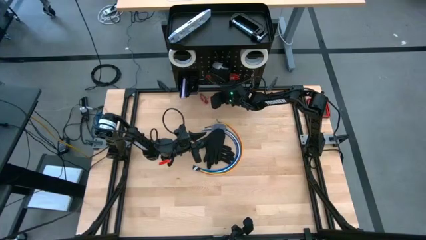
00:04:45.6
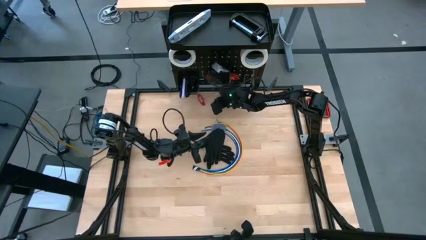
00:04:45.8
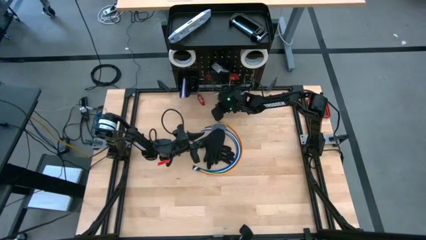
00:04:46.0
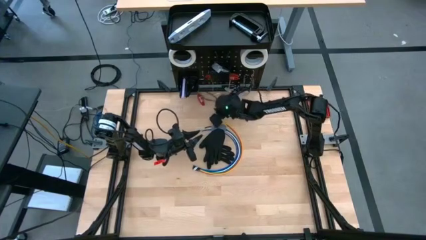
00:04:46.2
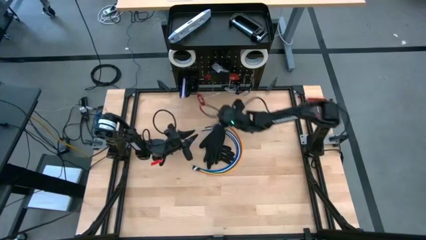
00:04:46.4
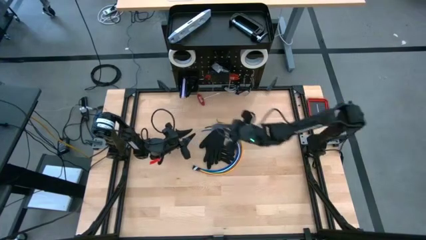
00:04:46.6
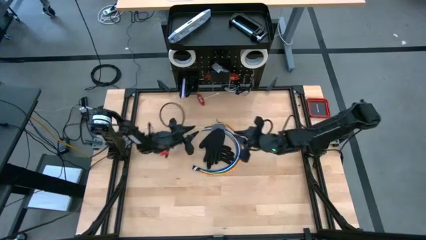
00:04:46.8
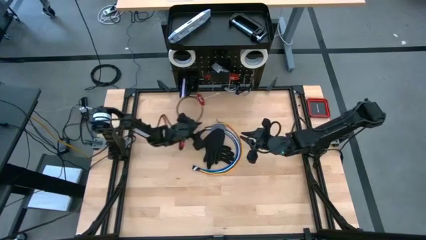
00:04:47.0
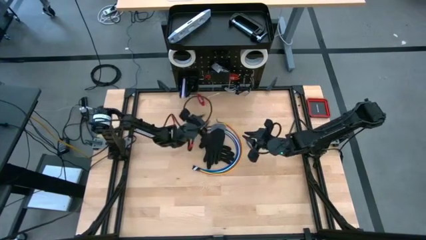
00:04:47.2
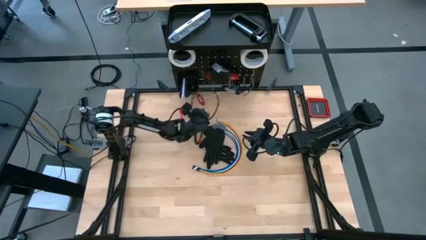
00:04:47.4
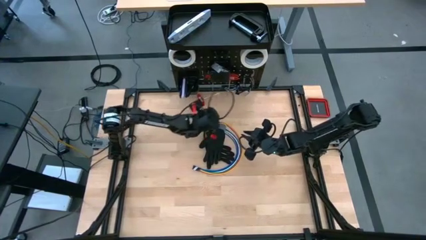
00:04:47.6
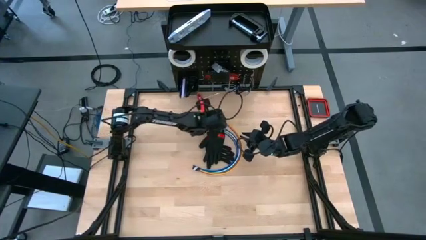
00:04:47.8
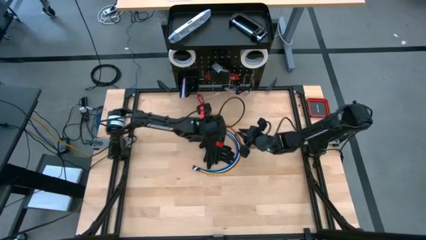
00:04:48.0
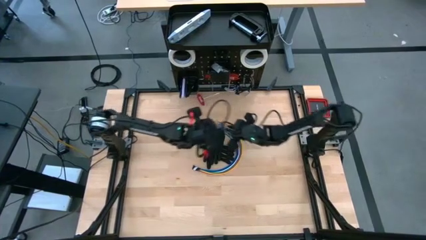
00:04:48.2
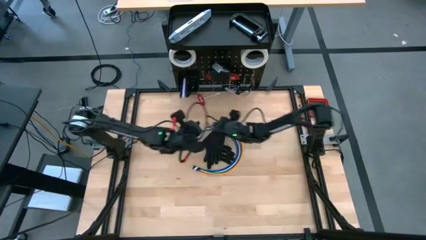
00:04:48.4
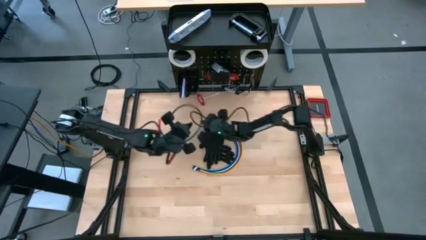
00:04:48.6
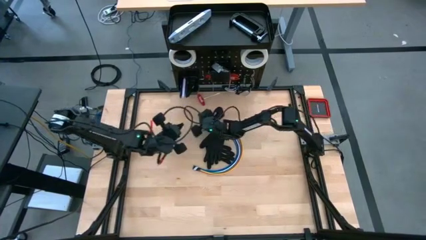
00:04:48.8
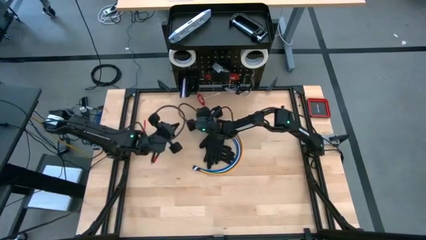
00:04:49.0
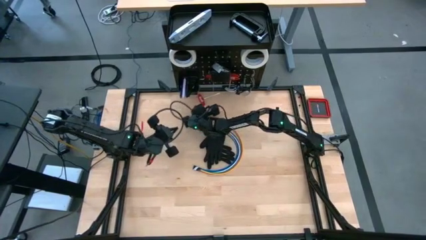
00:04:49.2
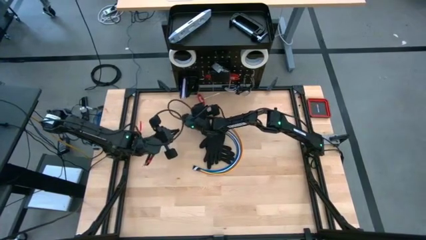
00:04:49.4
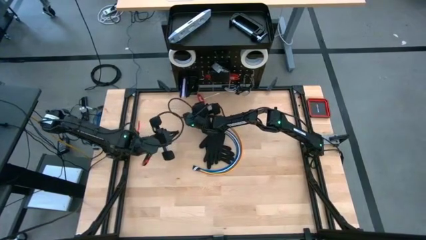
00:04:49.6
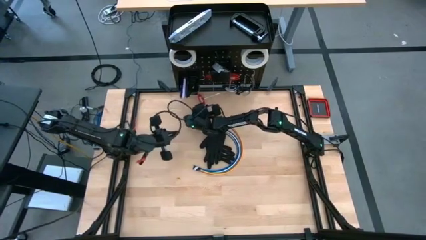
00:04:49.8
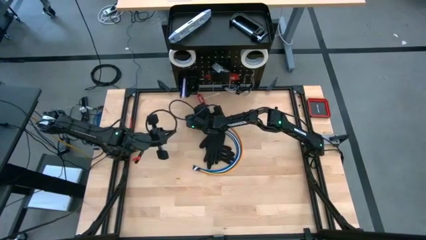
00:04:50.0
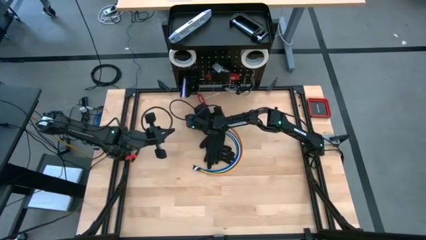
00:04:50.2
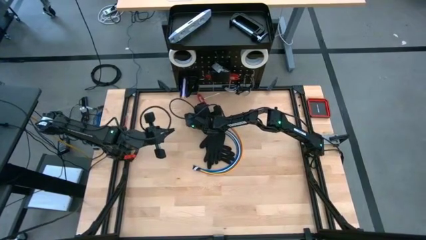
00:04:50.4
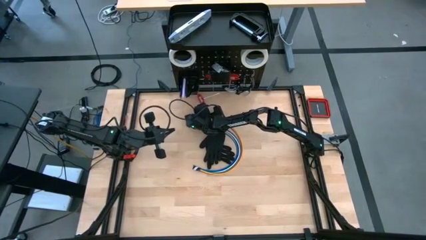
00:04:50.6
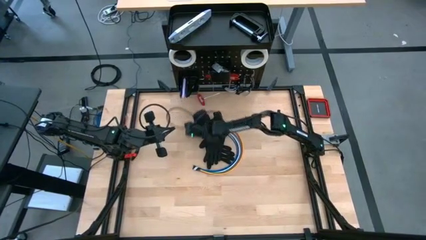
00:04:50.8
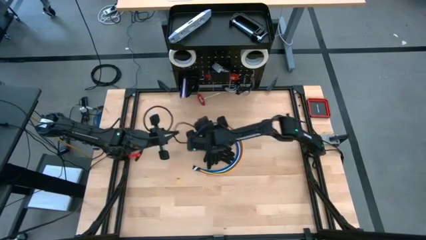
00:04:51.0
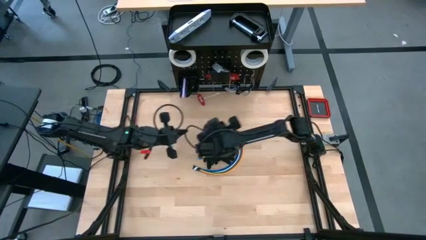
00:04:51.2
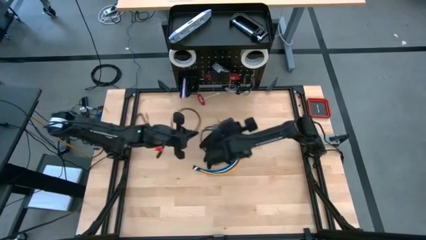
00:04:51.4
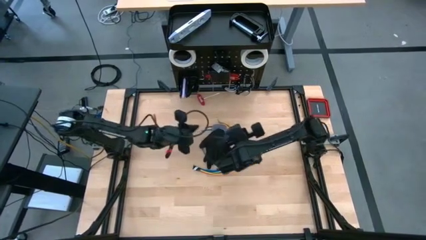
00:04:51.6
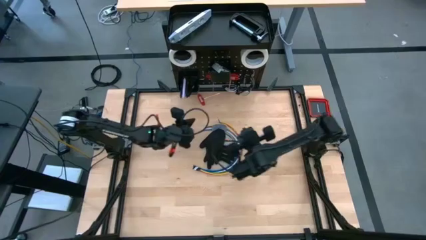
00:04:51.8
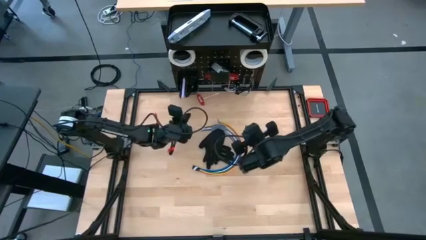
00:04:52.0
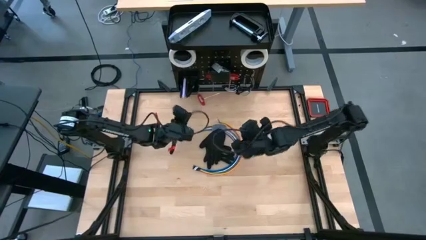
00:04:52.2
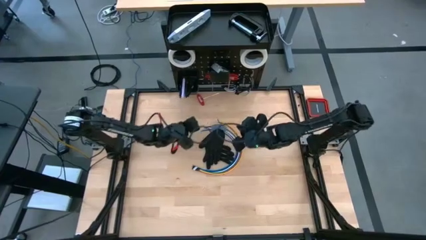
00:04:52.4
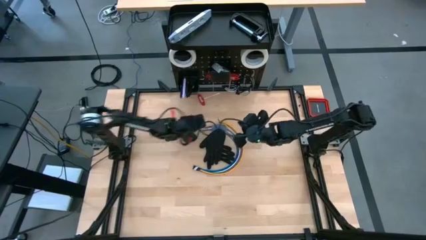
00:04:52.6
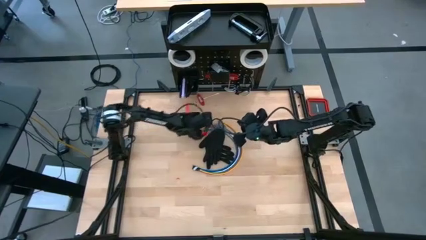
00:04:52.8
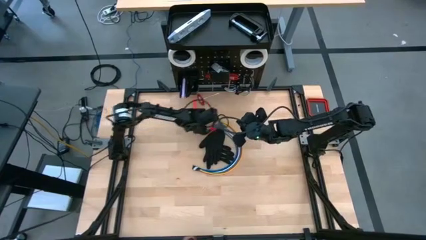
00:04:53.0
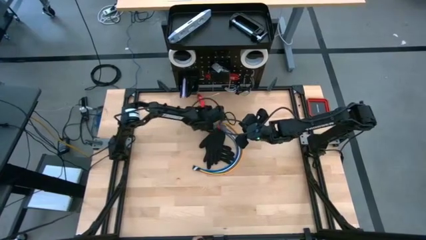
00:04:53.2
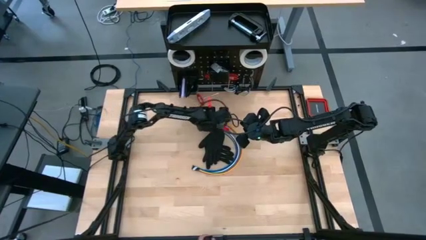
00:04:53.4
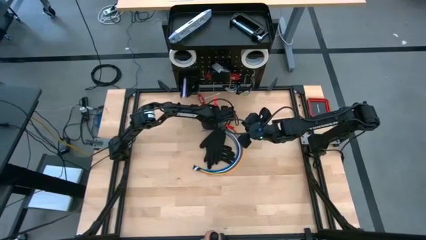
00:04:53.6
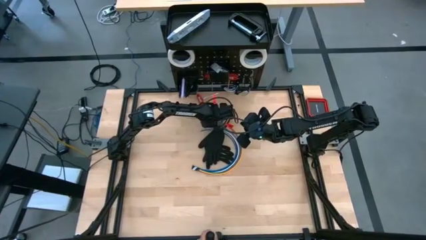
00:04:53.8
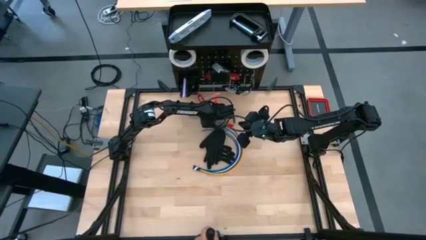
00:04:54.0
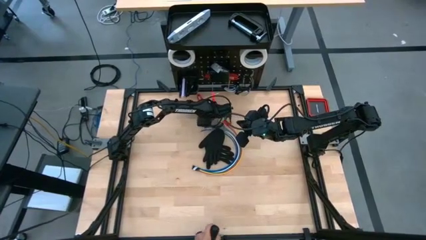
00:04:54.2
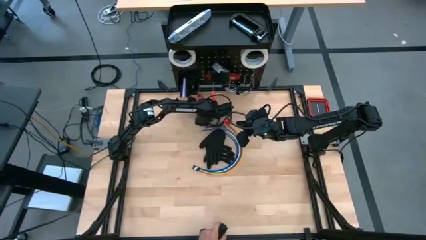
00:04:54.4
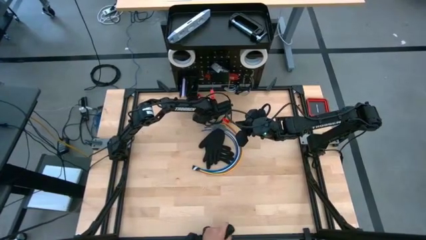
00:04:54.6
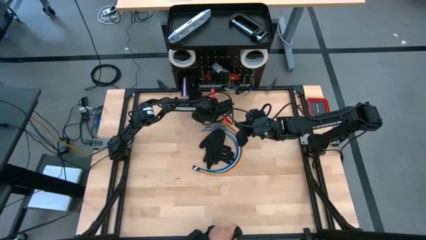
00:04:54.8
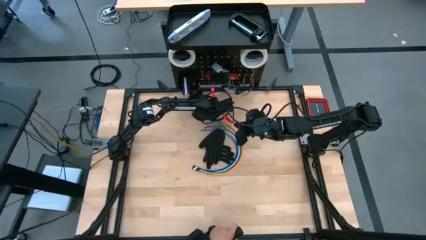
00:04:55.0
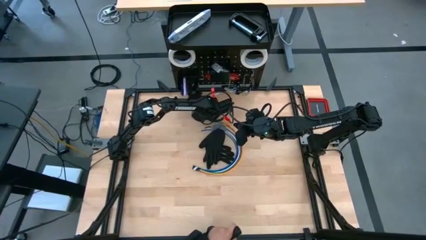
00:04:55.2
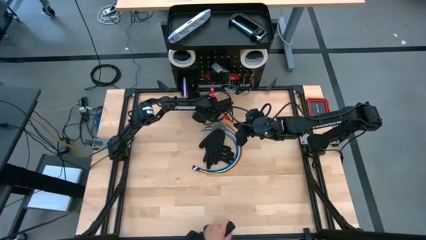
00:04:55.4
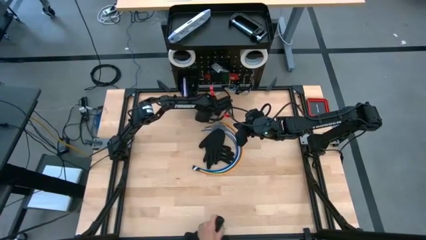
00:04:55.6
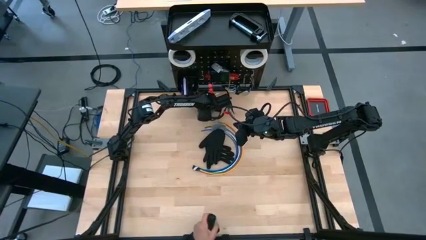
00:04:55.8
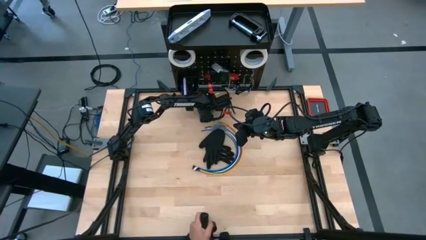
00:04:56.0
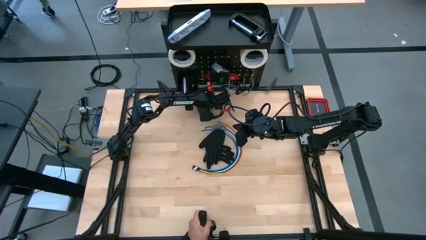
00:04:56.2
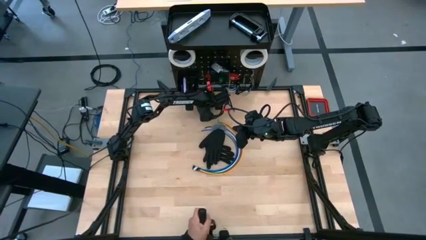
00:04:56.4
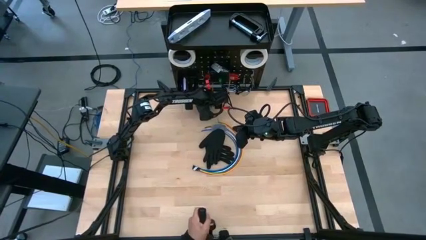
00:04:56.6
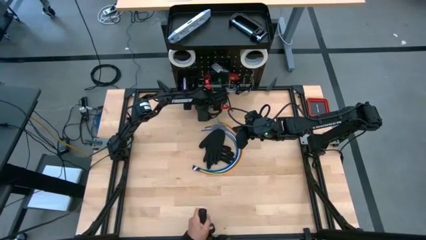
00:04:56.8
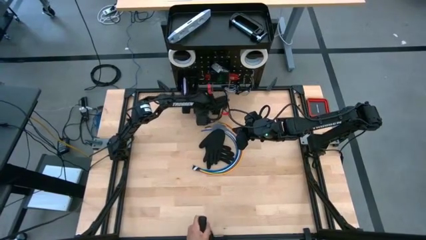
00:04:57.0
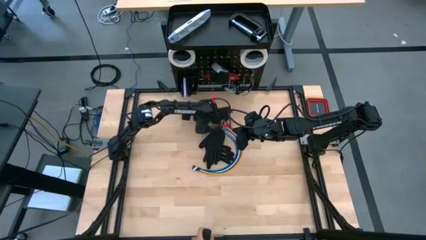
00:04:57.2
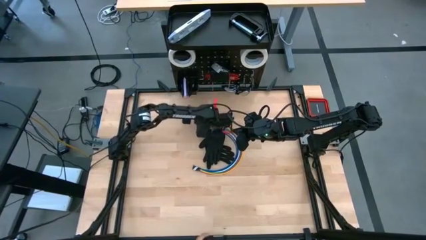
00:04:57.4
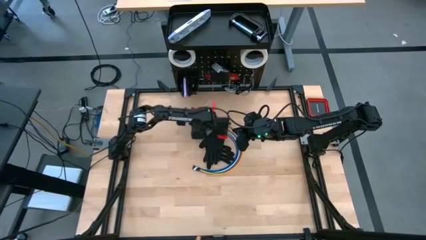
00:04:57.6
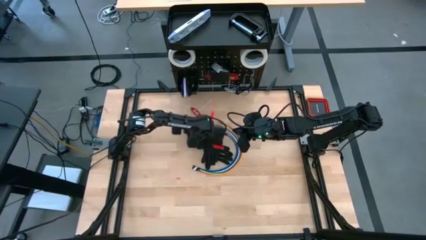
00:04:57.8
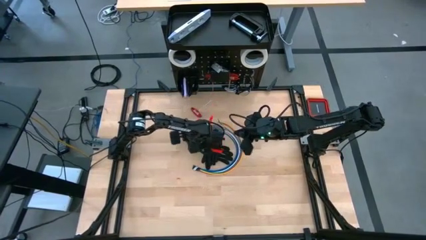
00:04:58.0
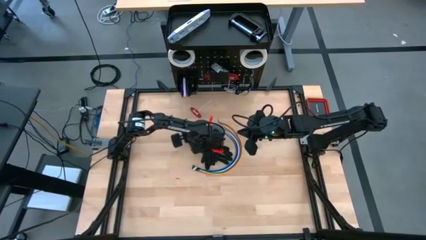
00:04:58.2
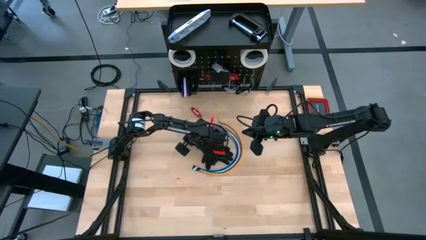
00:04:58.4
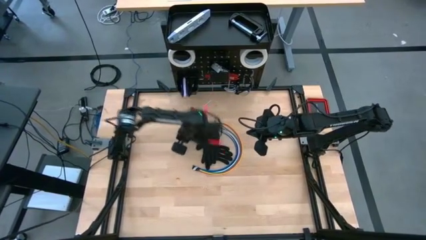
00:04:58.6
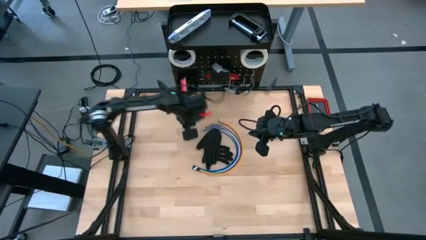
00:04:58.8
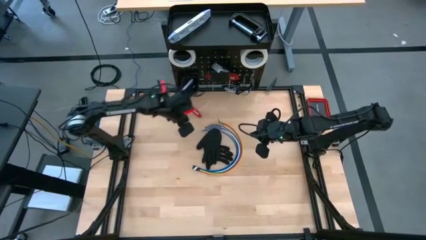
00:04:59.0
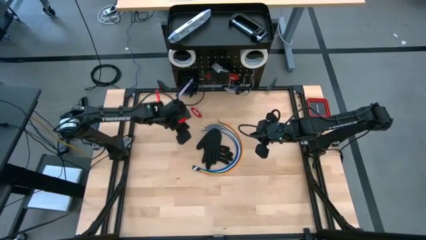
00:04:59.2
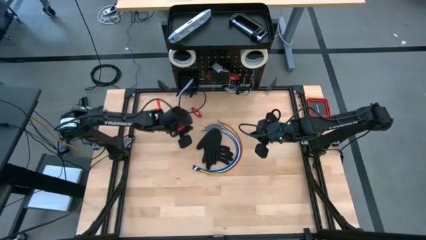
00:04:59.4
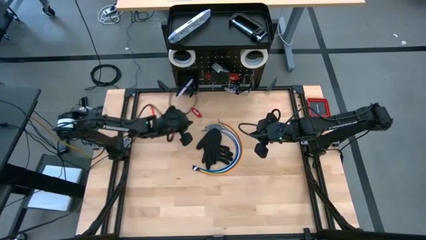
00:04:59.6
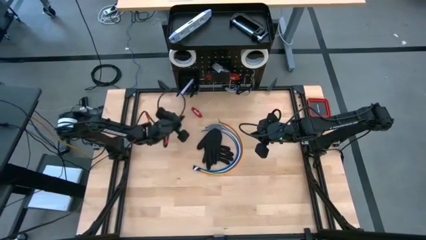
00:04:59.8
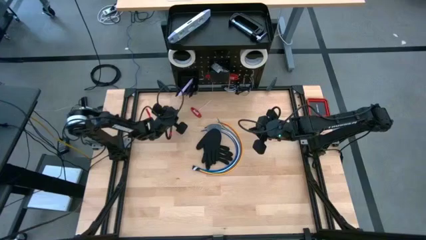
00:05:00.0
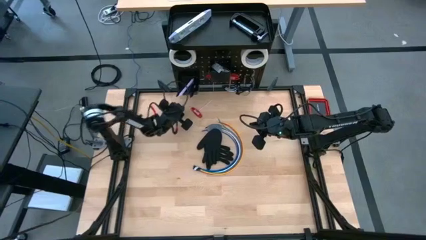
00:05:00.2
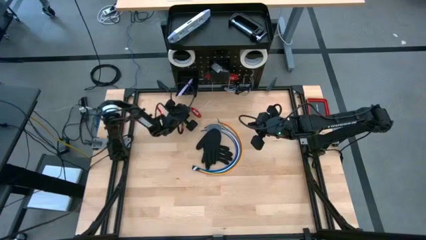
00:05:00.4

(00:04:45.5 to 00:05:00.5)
Task: Hang tools onto peg board
Hang the red allen wrench on the peg board

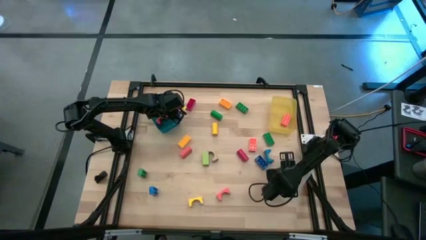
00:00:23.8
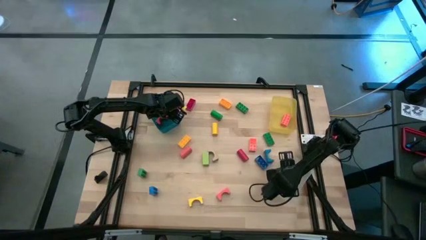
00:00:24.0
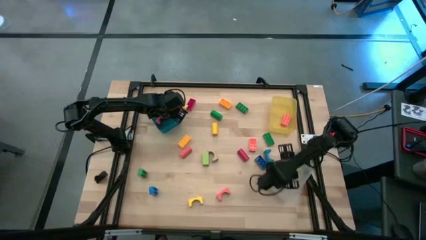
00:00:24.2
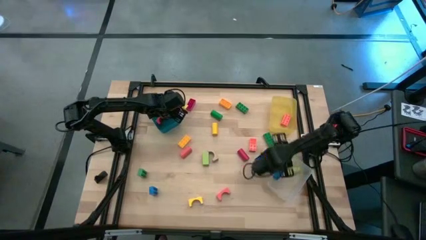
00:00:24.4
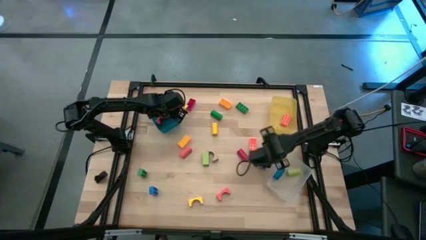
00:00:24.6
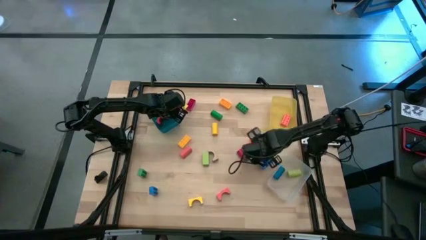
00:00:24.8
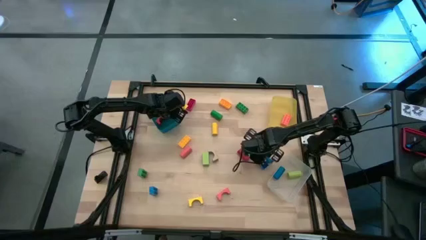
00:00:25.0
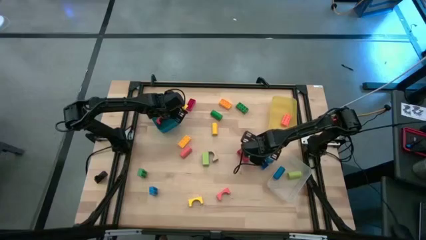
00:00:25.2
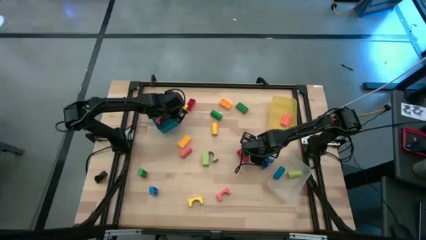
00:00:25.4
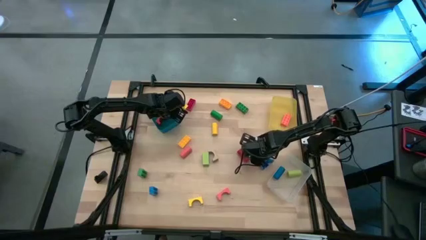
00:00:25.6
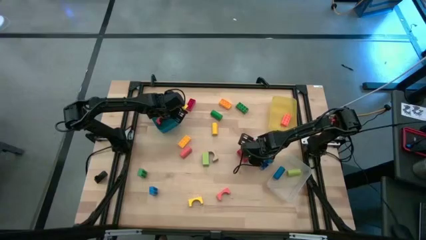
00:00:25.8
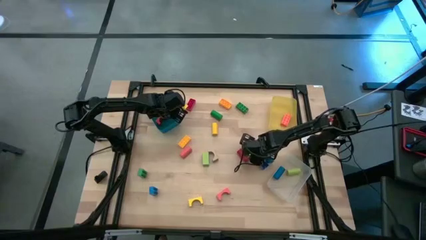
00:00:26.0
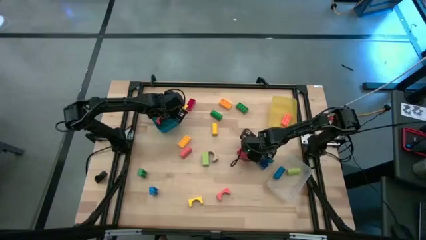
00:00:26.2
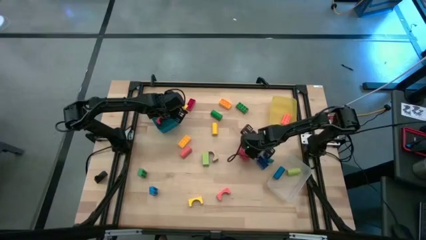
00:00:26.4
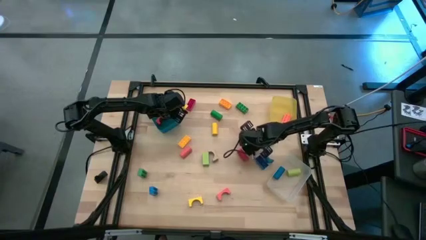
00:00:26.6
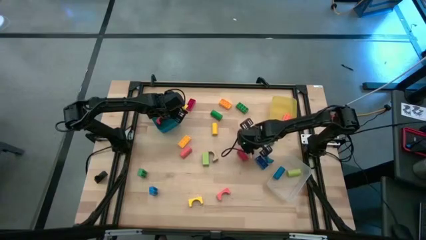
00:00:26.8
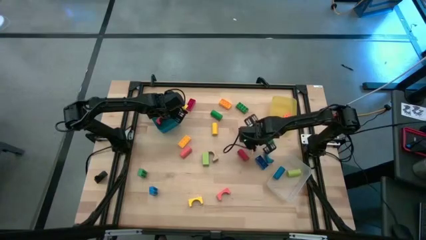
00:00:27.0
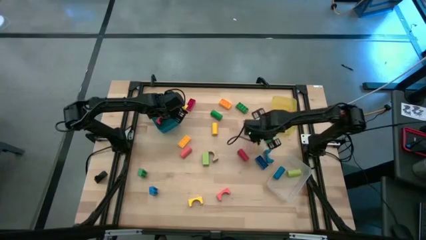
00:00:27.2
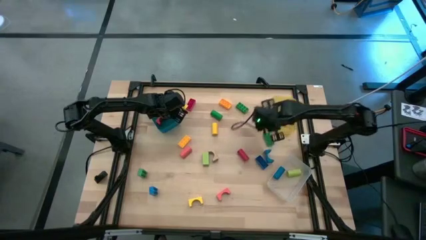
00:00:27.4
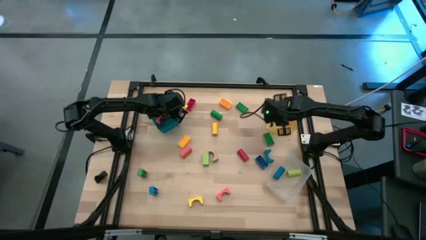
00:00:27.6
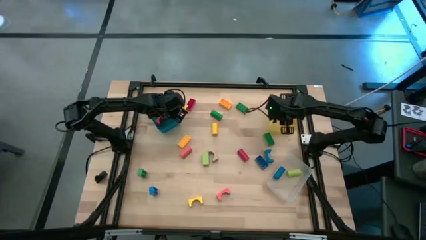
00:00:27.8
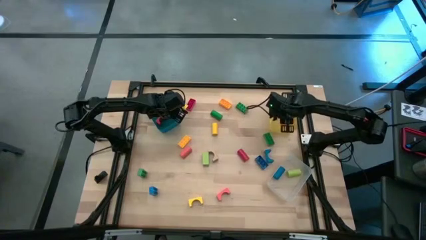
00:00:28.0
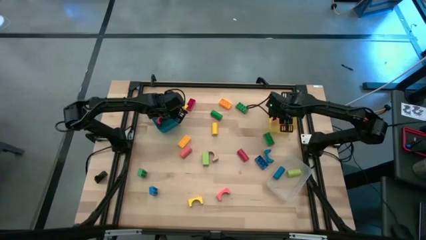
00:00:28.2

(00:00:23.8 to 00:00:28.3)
Task: Sort blocks by size
Put the orange game piece into the yellow bin
